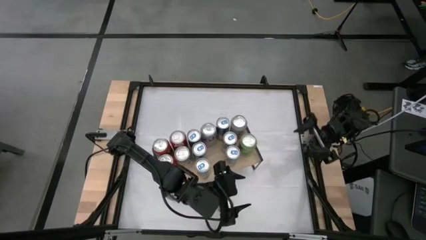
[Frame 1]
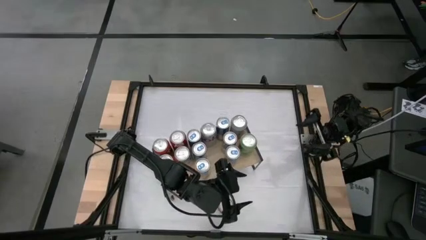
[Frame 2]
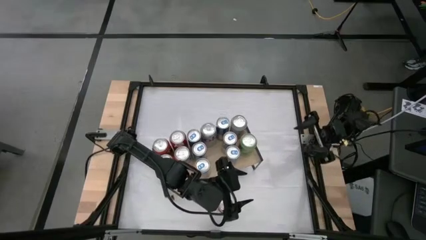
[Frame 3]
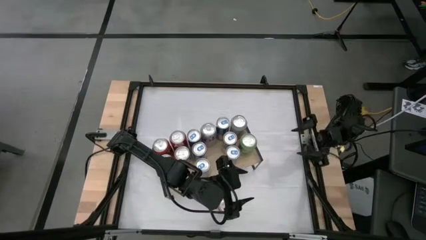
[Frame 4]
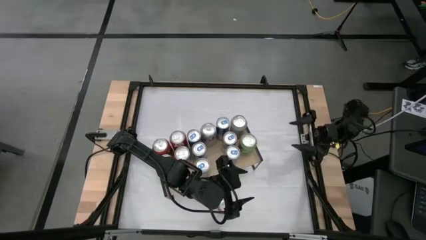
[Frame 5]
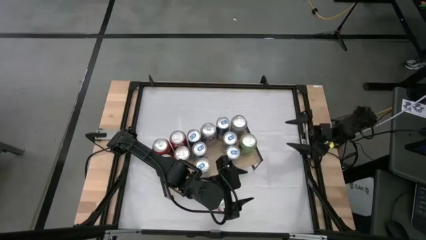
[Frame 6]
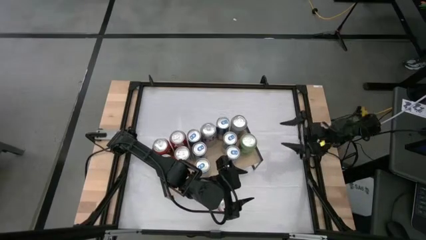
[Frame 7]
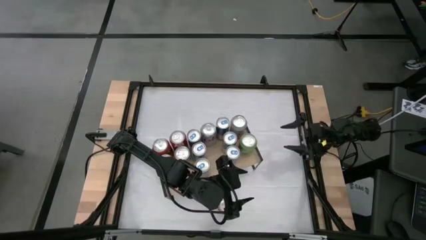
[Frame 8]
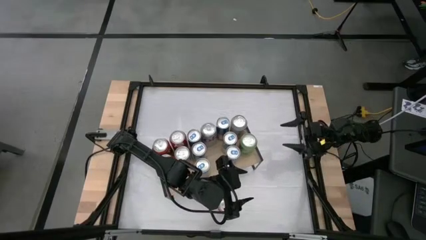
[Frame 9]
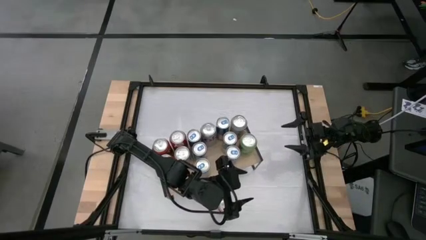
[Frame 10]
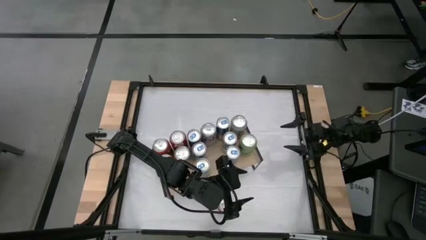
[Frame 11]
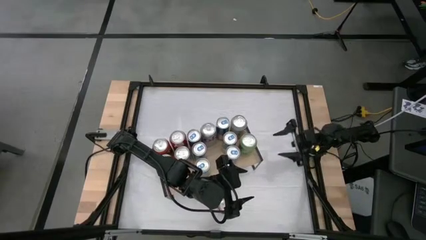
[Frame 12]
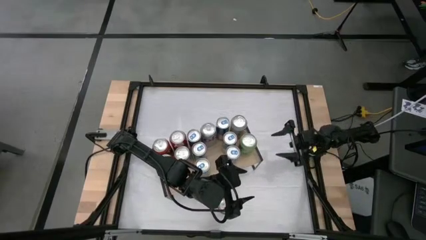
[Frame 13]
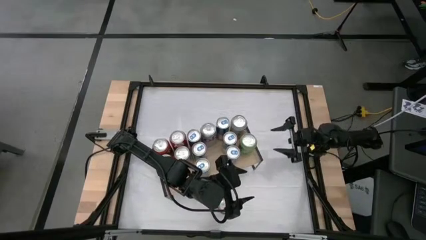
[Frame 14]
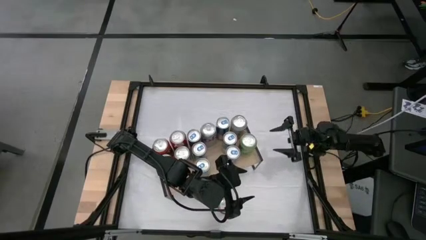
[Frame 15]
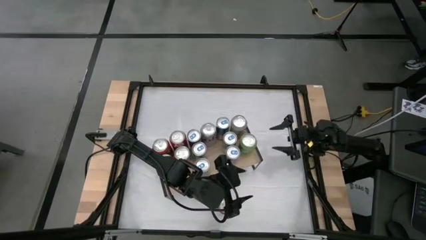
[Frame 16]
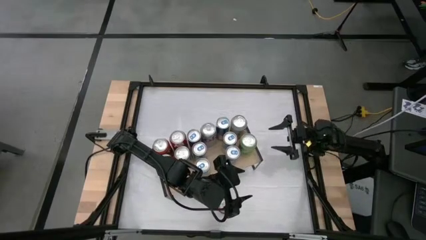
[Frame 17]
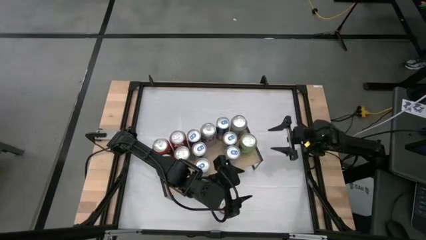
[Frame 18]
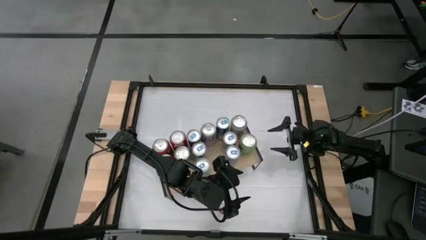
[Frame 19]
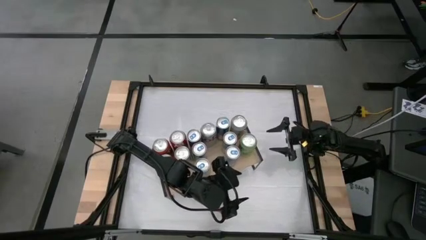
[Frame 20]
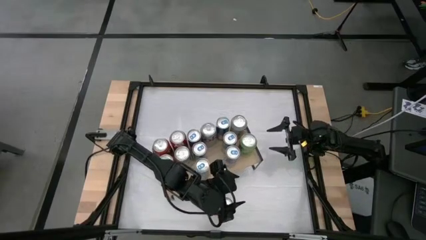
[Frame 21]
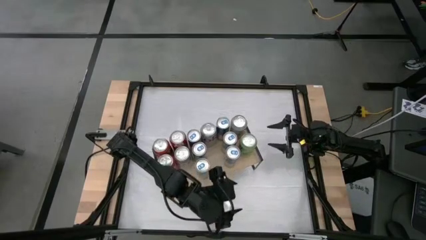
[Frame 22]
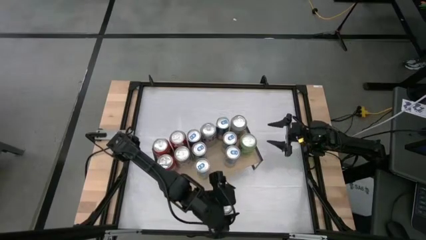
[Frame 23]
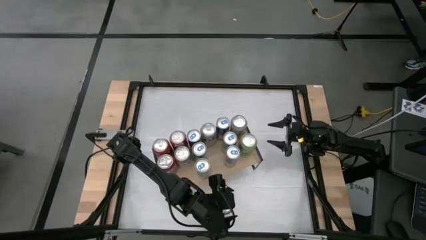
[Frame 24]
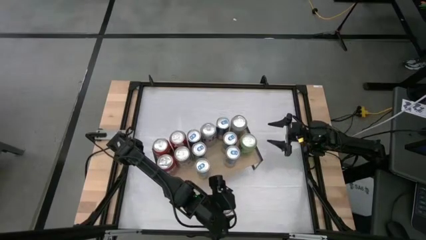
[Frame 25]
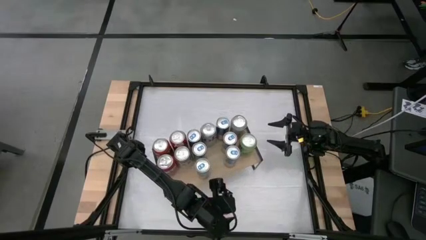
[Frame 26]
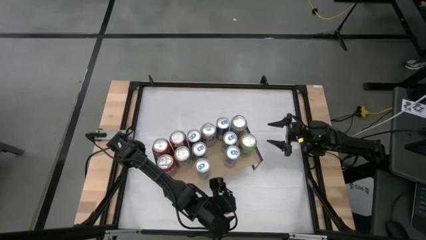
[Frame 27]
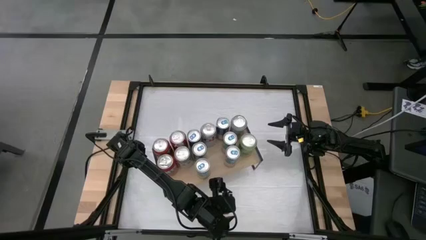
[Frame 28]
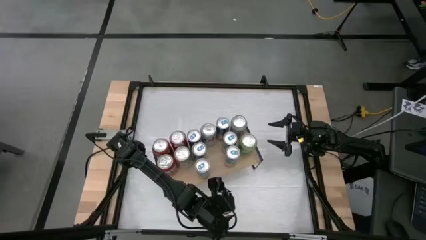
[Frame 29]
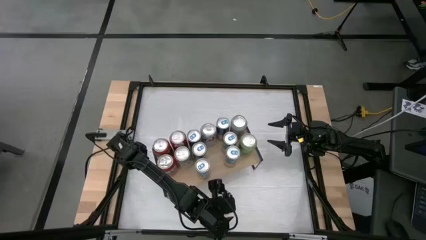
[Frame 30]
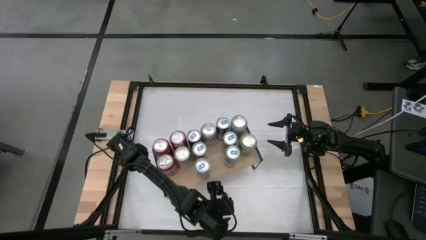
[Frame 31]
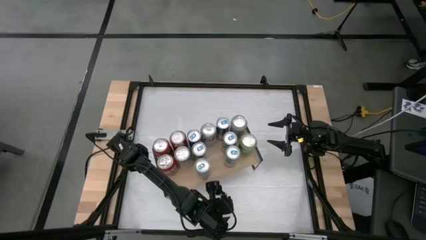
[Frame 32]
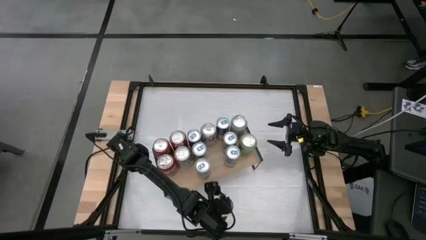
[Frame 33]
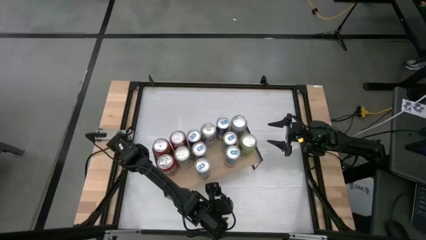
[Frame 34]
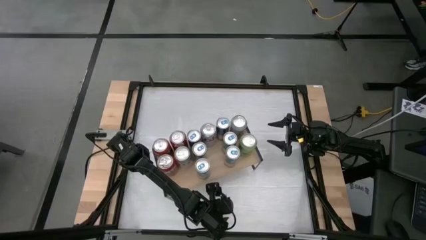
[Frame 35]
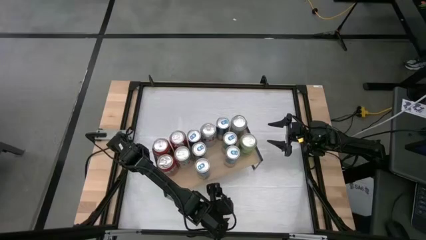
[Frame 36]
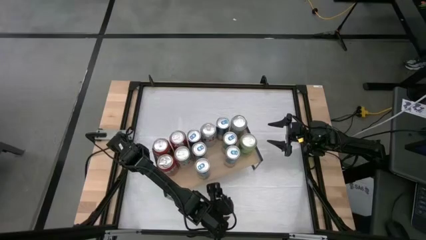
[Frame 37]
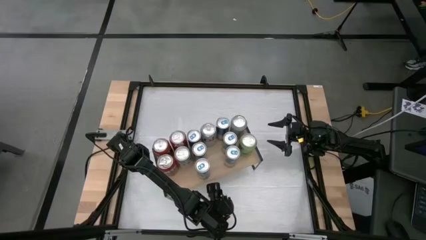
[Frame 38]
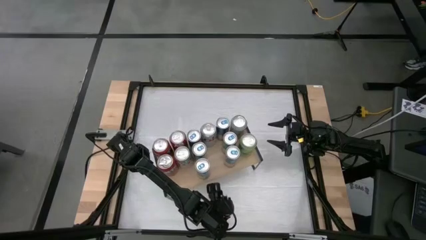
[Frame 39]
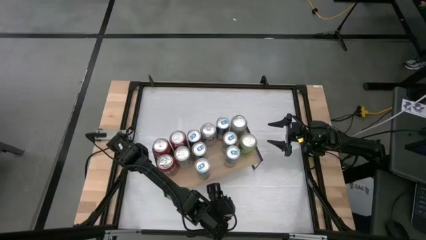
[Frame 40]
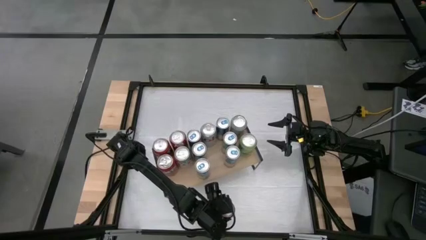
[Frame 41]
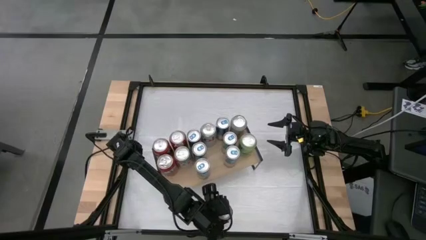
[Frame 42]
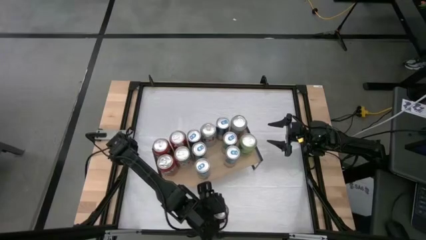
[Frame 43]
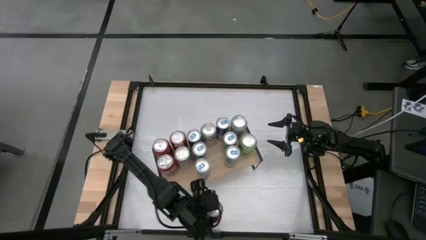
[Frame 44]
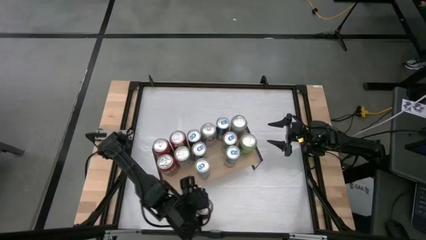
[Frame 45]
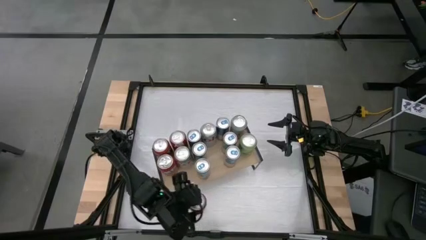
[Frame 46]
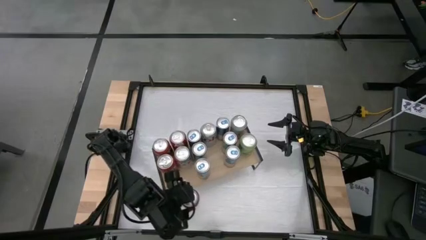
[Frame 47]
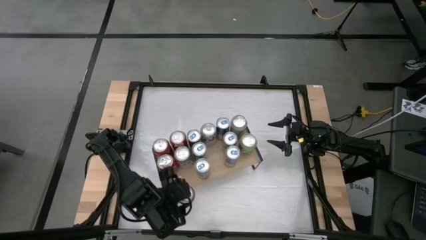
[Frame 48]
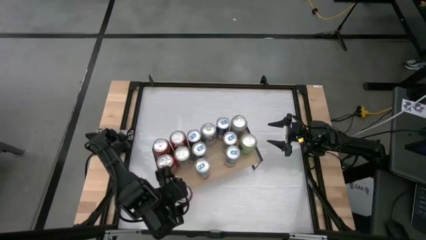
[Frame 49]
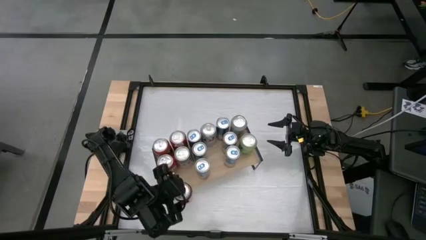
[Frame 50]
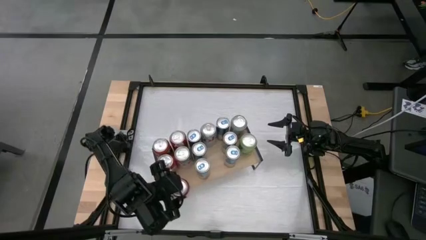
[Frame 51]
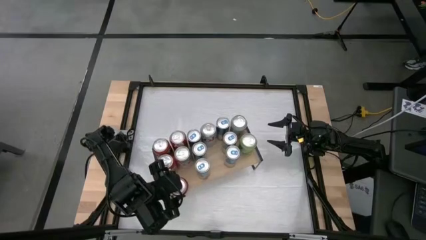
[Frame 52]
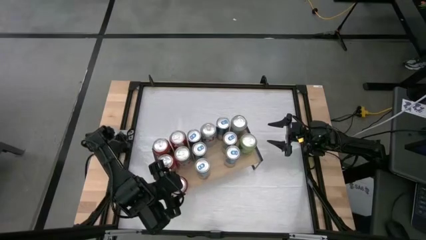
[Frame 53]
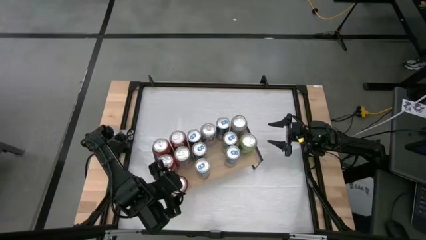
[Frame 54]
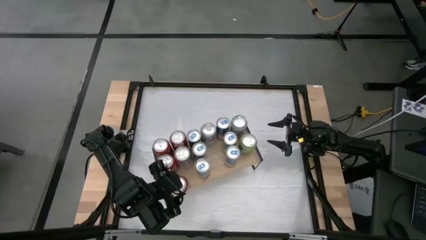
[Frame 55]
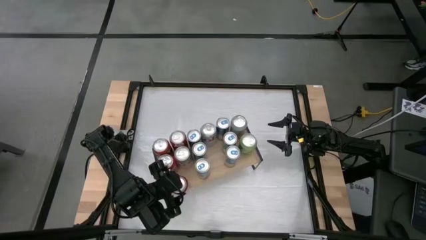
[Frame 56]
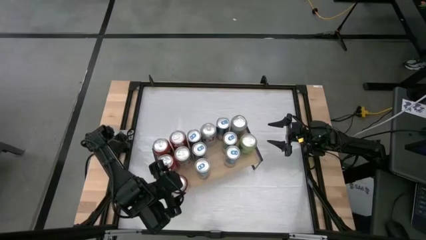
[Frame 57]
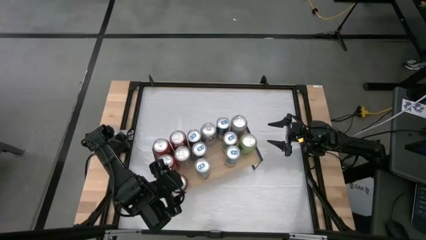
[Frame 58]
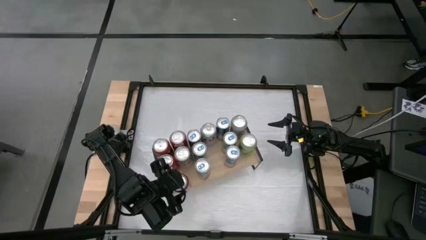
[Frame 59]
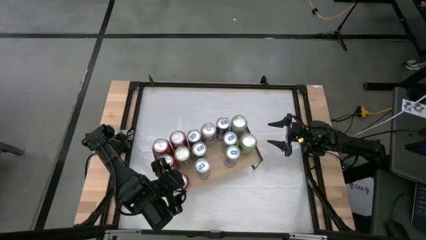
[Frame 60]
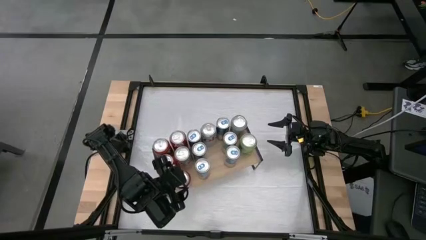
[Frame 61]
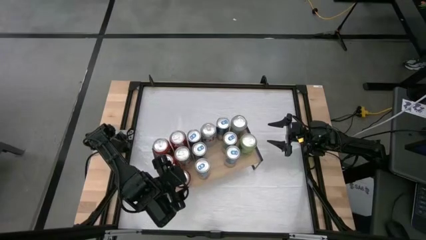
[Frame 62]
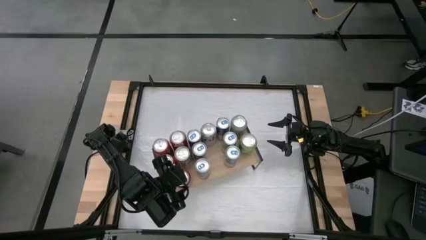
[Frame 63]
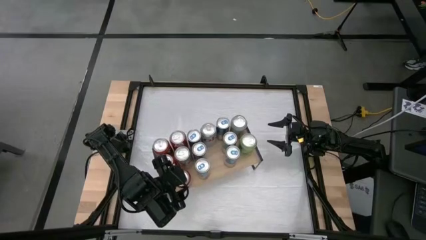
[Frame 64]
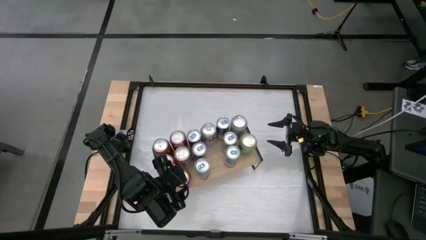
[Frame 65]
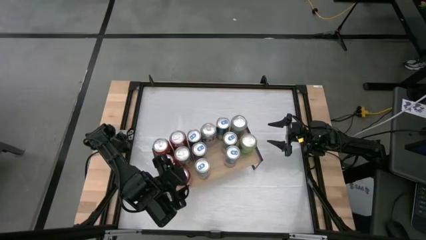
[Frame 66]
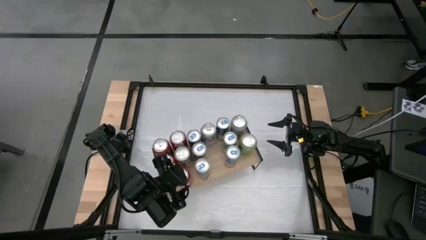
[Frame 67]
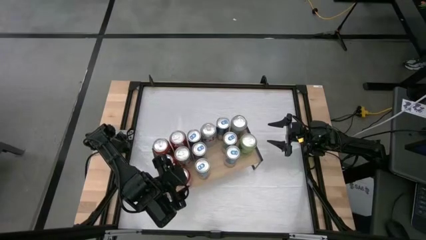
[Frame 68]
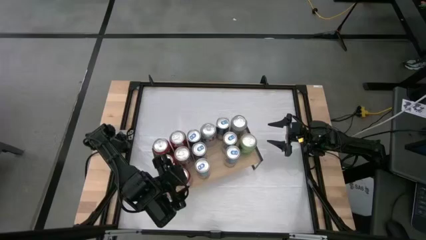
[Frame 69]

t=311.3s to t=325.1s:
Task: Place canned beverage on shelf
Put the red soda can on the shelf

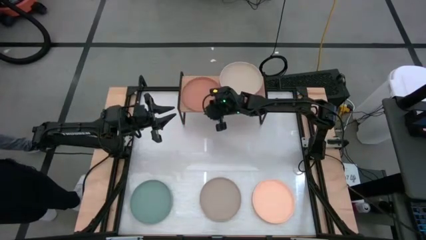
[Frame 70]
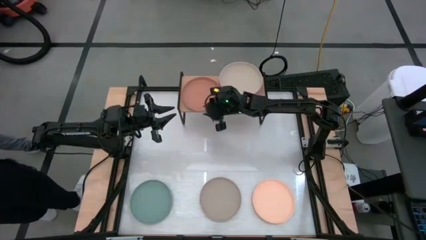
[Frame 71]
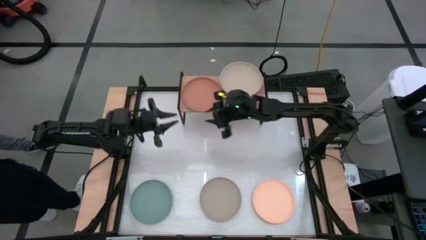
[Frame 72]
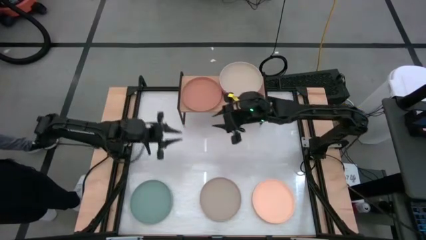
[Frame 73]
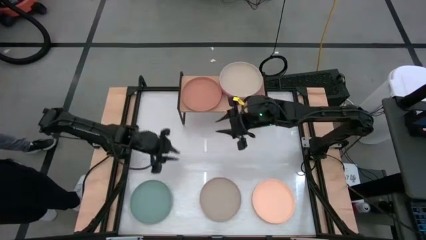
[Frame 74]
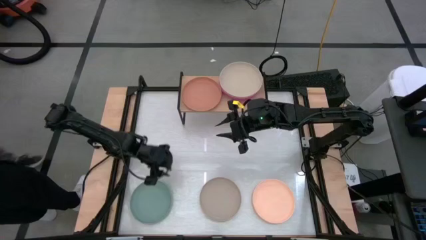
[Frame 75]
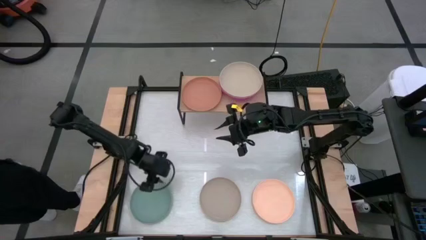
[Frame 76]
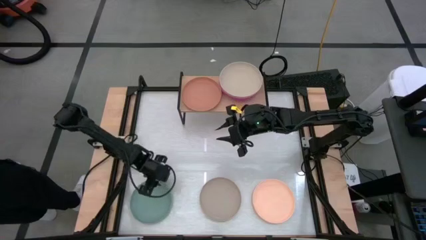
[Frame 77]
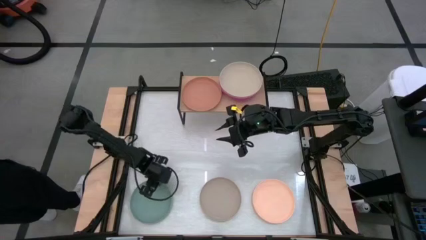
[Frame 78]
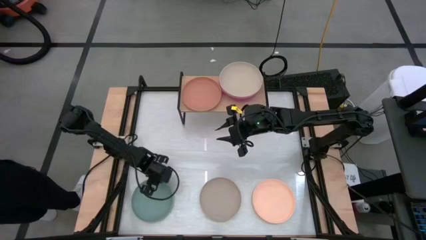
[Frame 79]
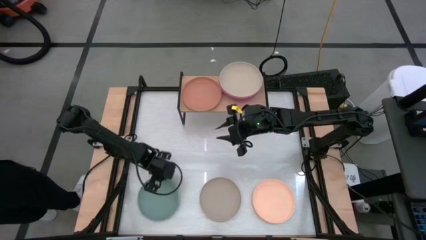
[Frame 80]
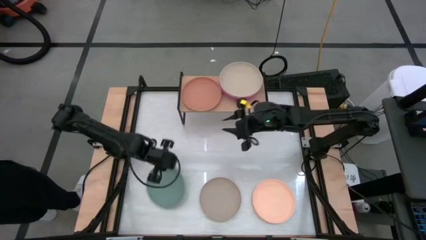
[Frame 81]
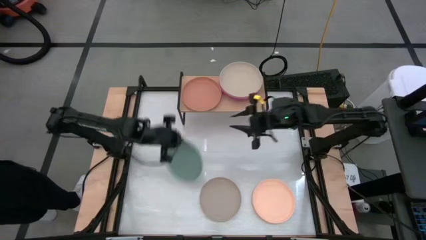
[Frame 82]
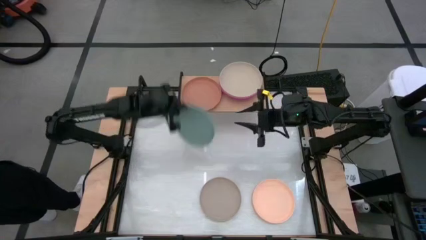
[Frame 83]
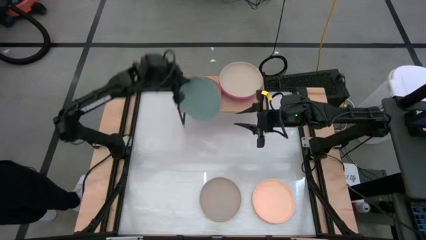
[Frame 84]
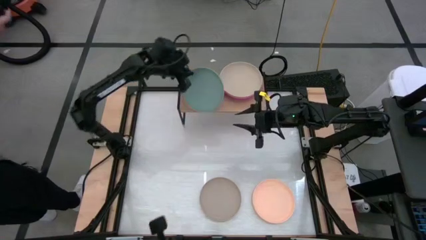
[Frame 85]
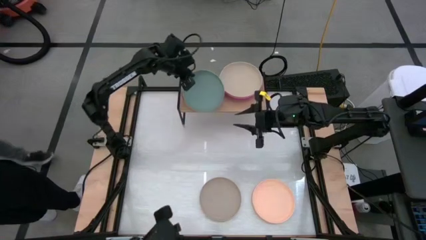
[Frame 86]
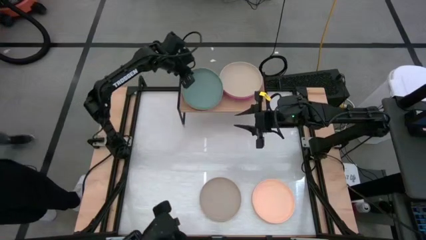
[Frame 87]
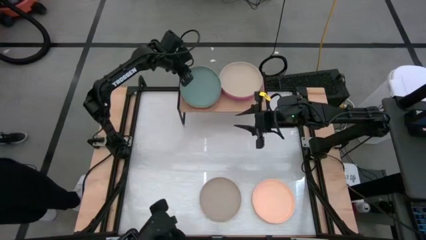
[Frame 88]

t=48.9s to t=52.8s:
Task: Place and stack plates onto a shelf
Stack the green plate on top of the brown plate on the shelf
